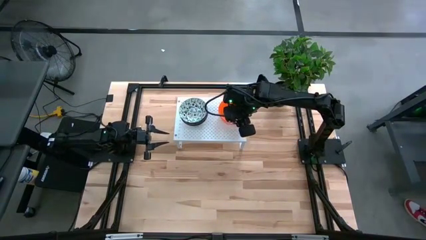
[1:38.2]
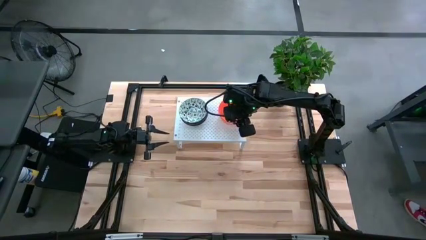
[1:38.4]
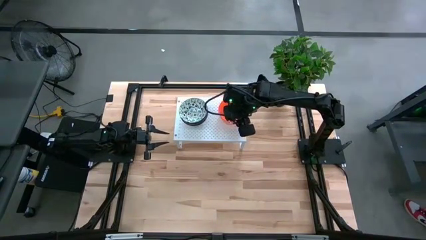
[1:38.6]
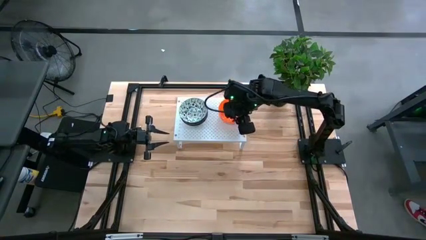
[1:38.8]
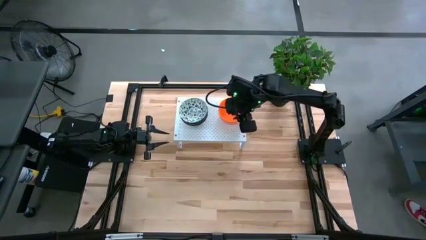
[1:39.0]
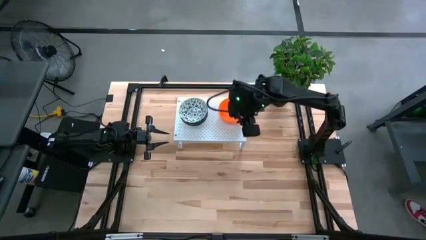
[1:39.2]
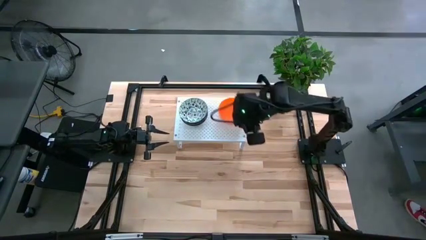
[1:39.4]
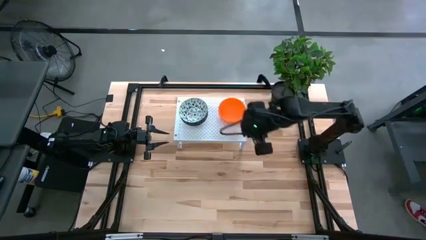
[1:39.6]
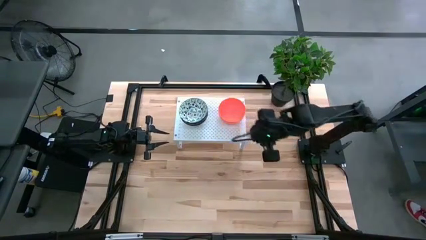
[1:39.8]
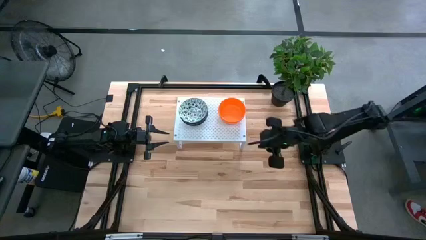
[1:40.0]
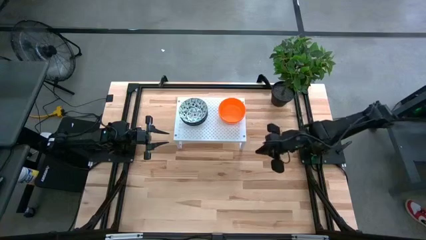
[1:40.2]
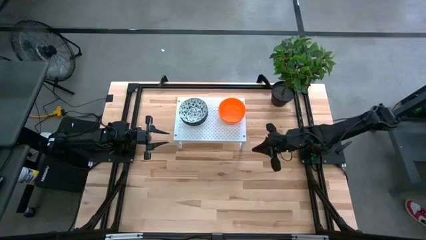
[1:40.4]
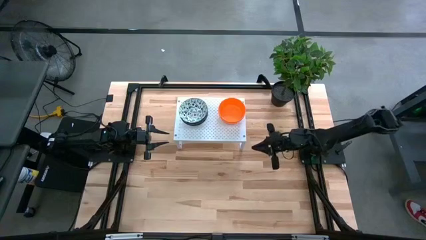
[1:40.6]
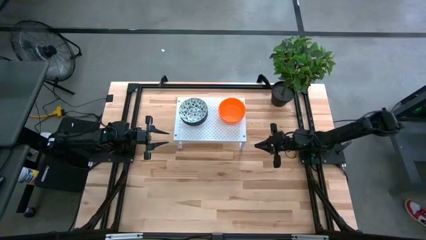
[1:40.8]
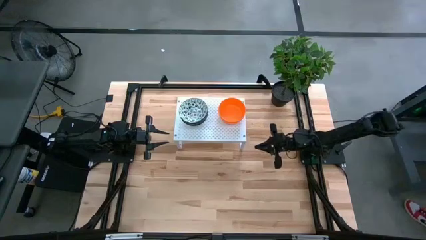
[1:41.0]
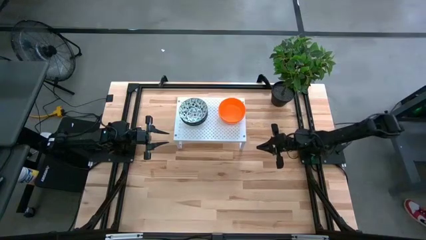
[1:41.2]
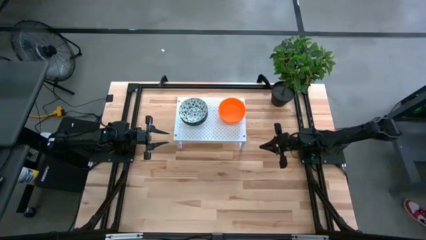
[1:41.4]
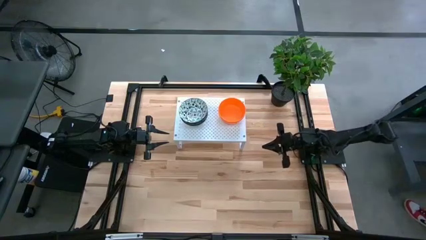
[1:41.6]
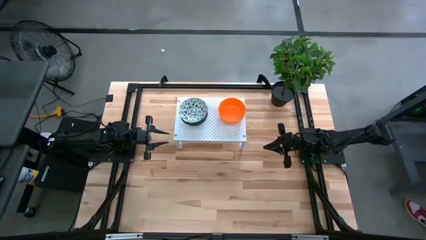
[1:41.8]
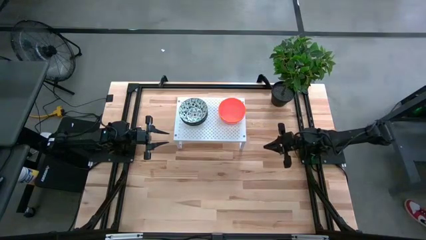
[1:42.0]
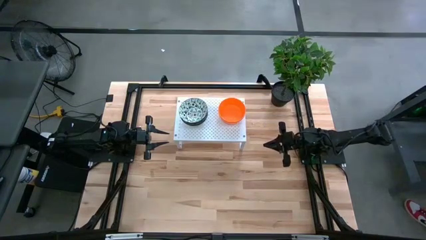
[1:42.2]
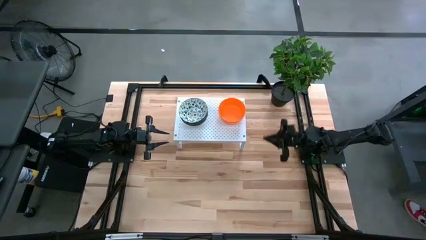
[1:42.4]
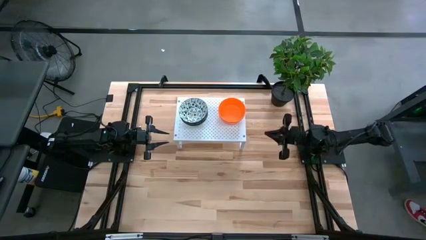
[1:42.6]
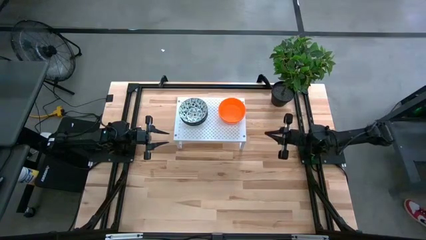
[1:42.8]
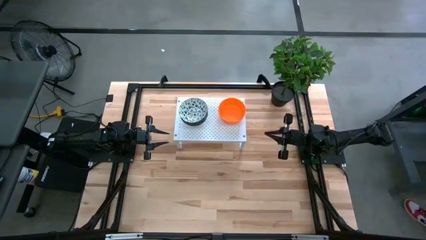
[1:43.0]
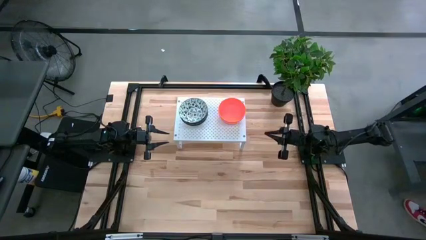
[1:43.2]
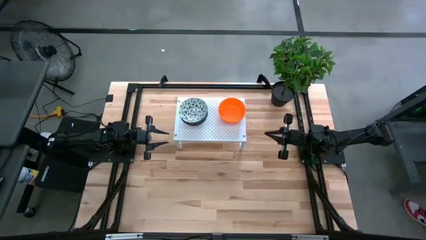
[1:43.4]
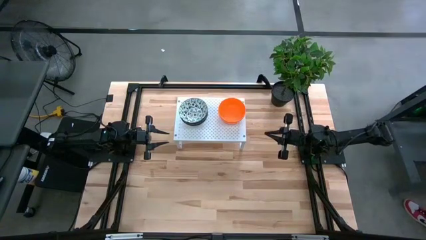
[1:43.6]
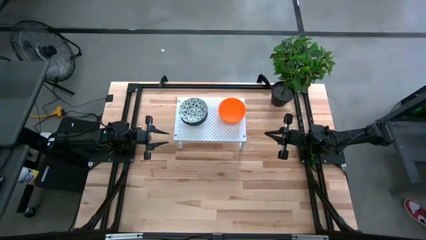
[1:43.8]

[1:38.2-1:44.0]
Task: Pick & Place Mini bowls
Return to Home Position

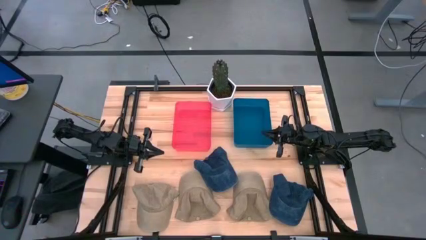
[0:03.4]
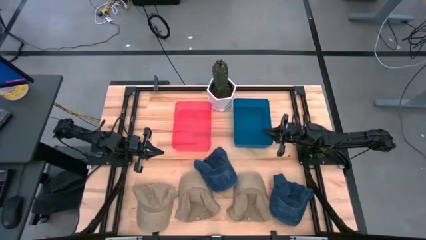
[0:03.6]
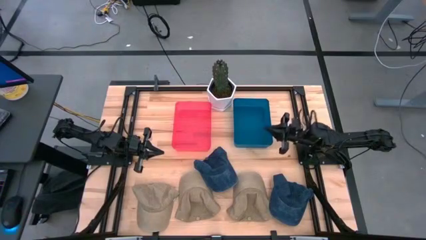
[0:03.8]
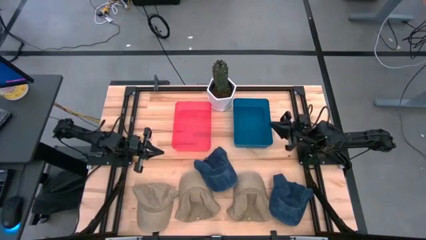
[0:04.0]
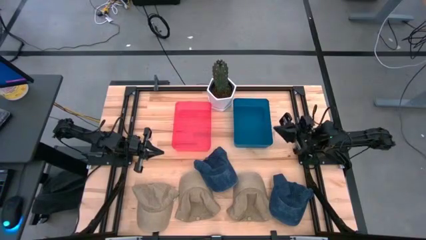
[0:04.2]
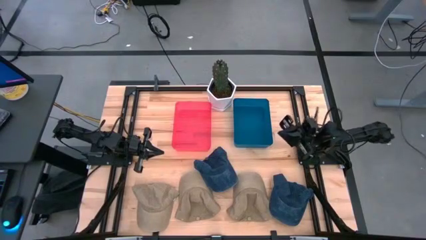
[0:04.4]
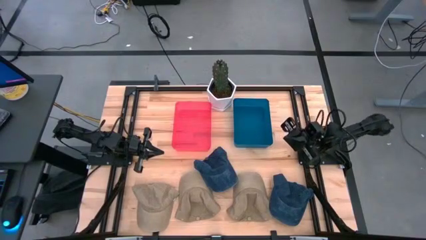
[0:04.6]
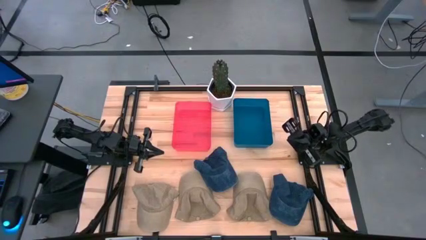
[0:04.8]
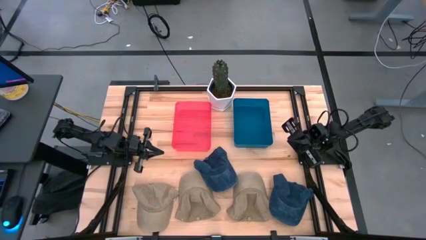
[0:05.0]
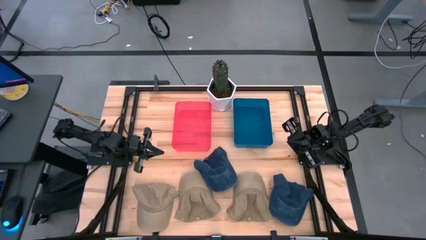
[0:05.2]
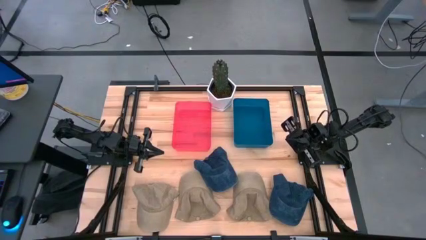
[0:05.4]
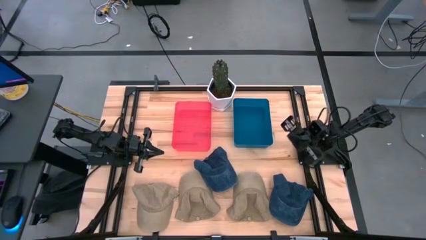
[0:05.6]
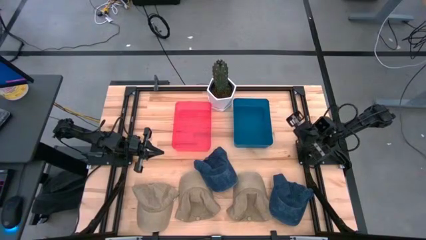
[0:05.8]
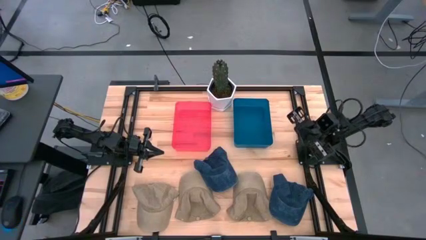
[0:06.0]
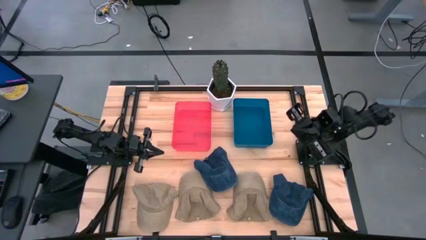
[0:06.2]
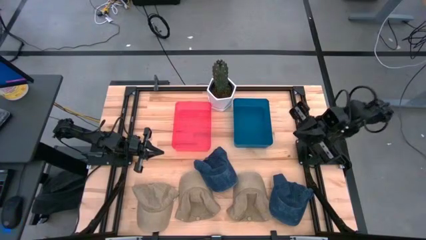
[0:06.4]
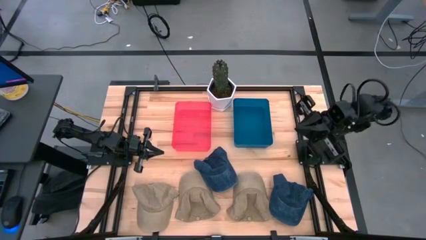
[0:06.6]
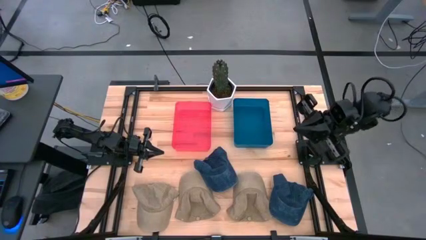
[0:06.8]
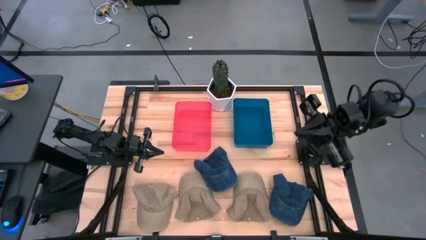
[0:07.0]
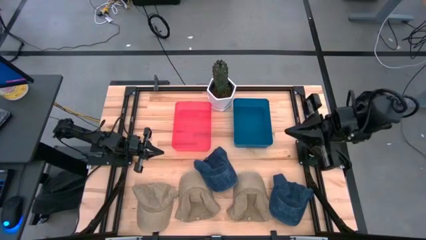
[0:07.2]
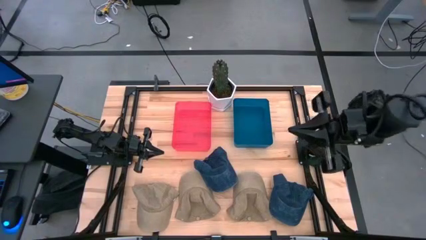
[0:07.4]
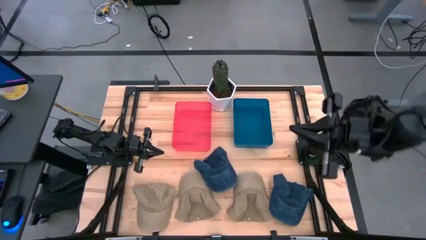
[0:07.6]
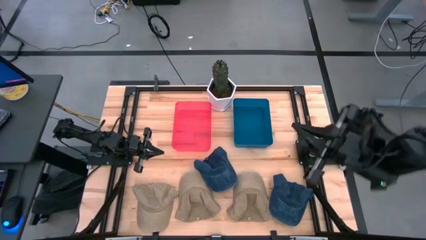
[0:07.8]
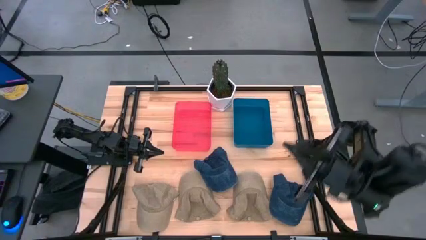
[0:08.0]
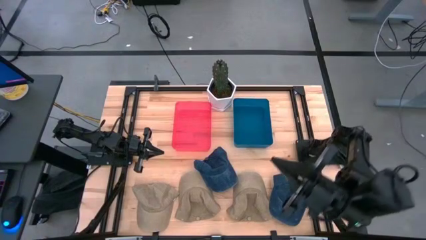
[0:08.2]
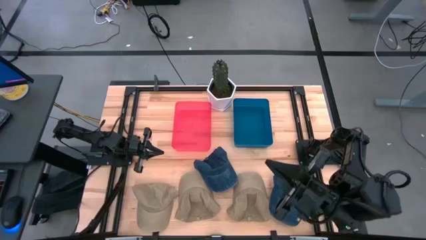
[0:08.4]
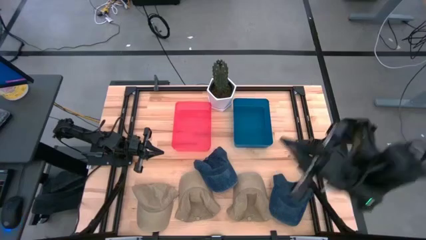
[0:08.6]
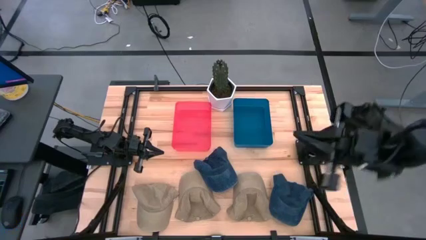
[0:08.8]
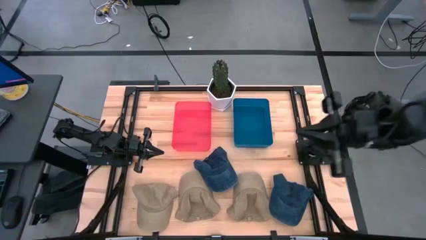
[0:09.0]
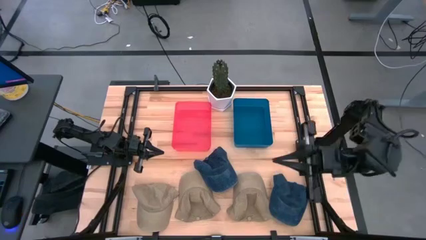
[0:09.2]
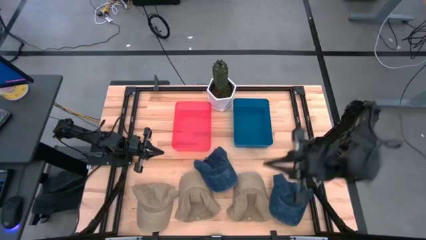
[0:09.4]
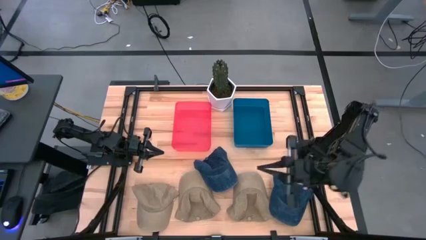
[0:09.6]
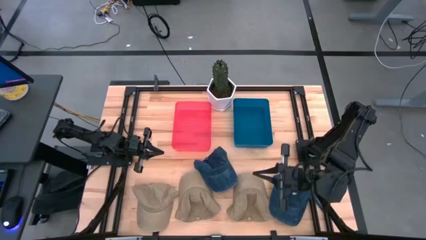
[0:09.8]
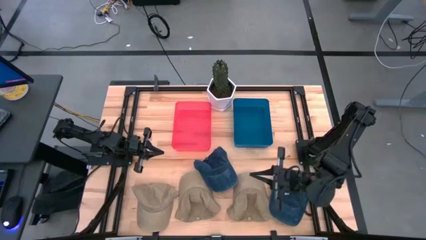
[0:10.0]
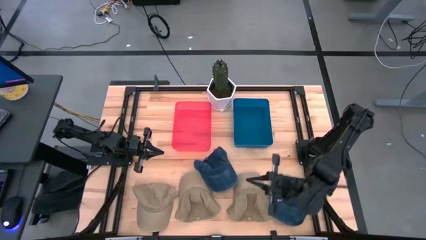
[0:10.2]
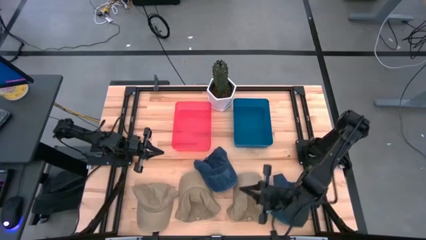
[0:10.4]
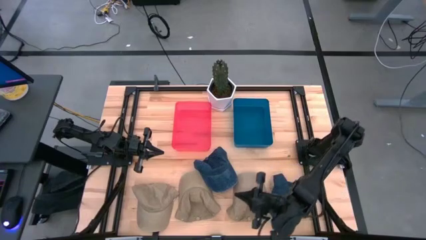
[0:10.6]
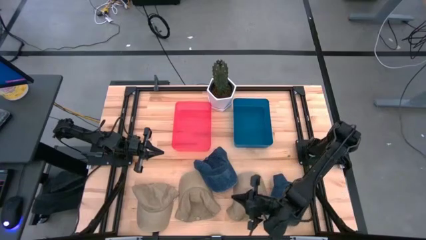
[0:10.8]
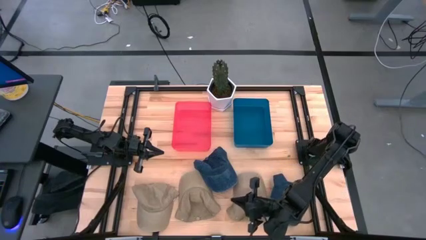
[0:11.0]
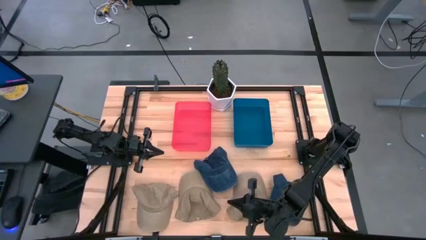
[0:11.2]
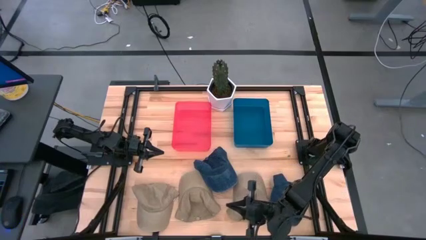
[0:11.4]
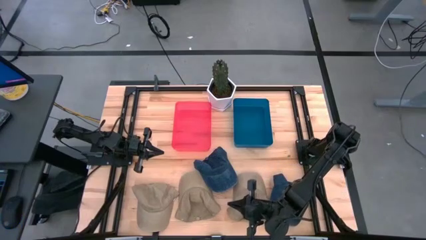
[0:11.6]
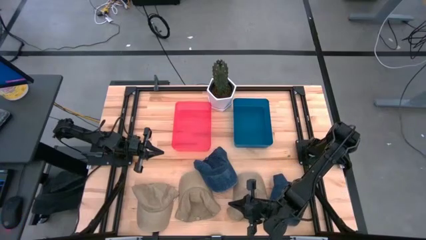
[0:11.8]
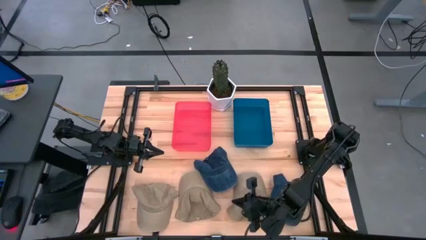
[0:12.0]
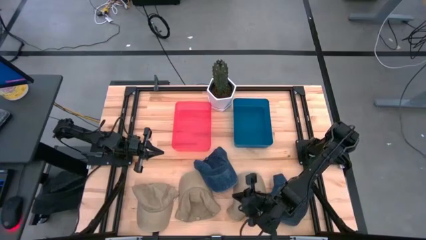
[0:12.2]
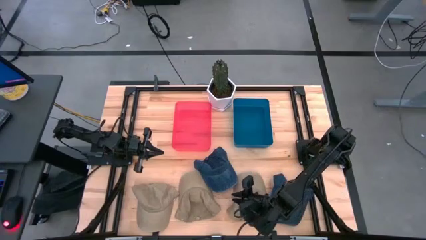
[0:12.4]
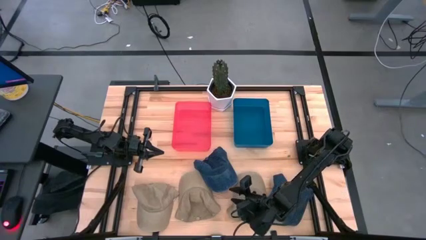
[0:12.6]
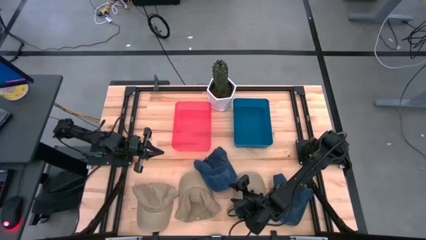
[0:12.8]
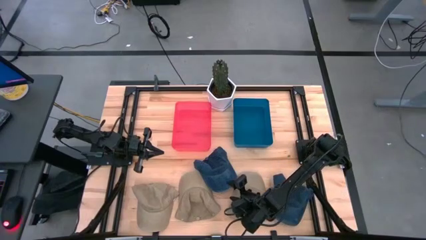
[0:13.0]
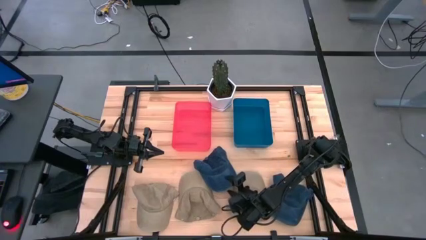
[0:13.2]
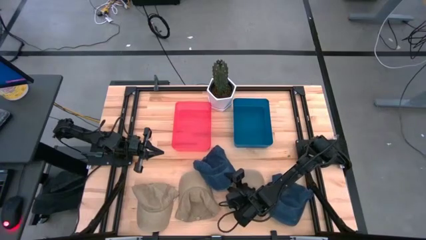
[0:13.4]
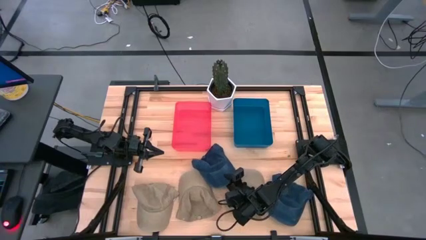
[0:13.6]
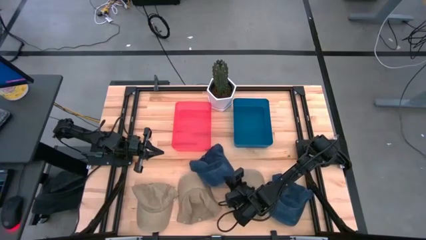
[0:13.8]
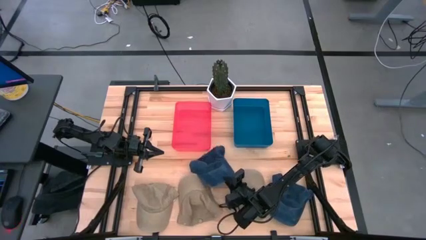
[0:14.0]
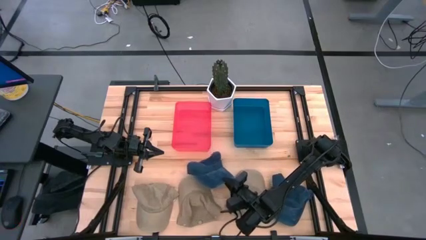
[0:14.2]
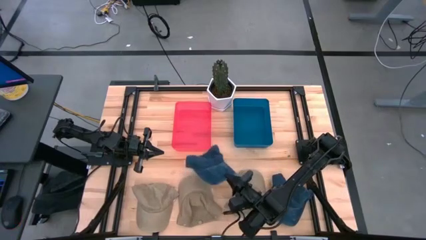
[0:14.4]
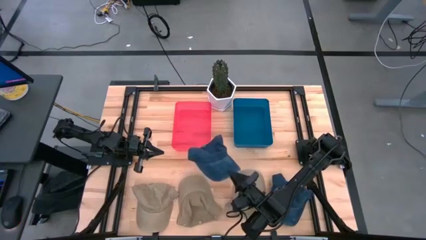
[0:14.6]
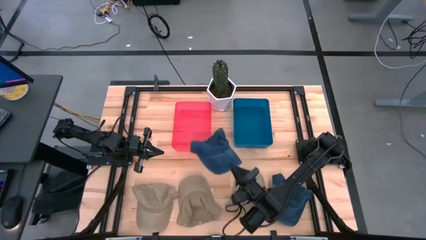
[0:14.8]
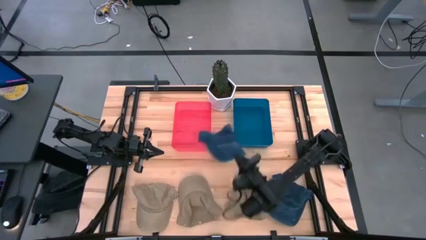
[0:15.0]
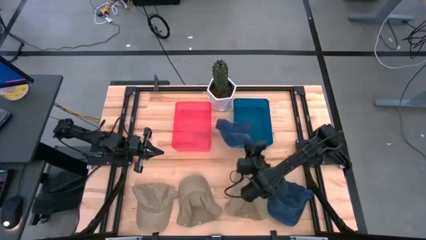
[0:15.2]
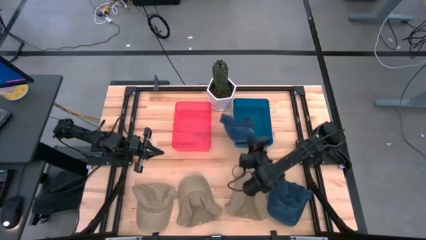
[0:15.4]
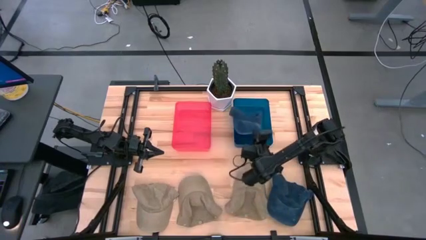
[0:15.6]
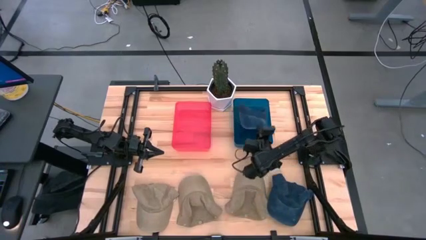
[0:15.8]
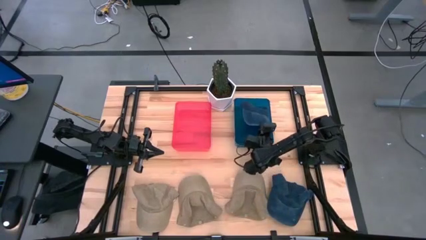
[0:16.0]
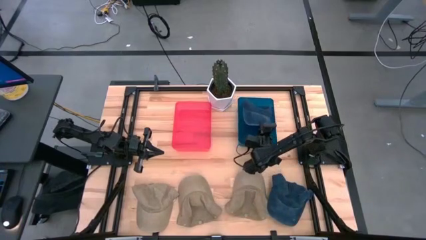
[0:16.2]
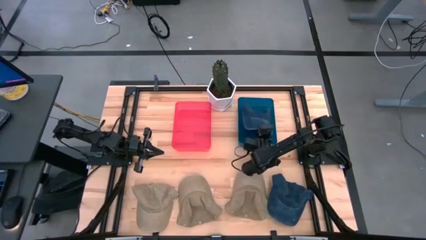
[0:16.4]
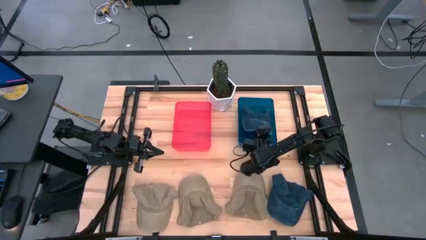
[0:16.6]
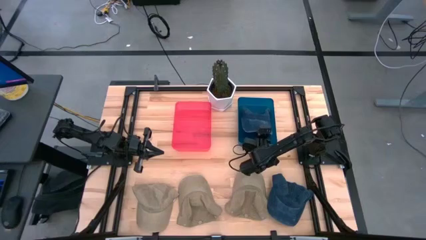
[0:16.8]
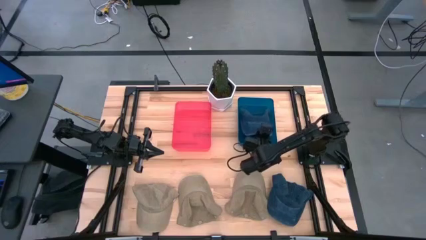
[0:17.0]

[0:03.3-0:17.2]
Task: Pick & Place hat
Put the left blue cap into the blue bin
